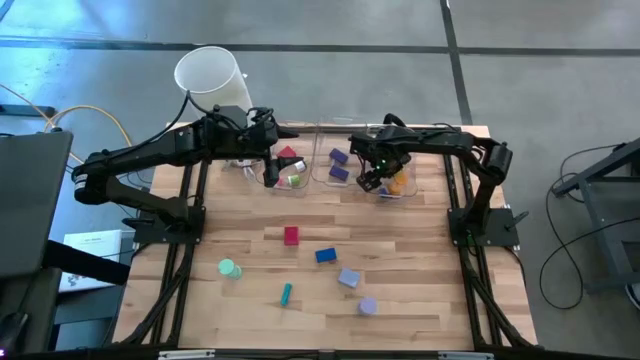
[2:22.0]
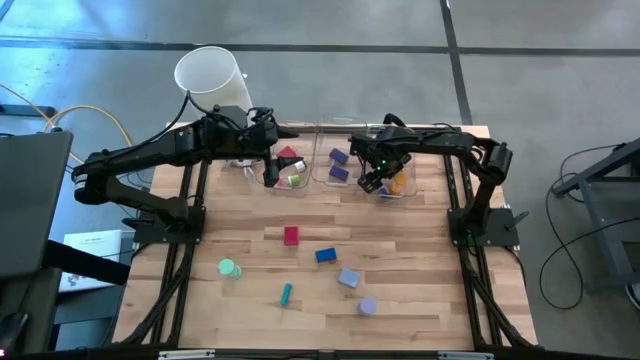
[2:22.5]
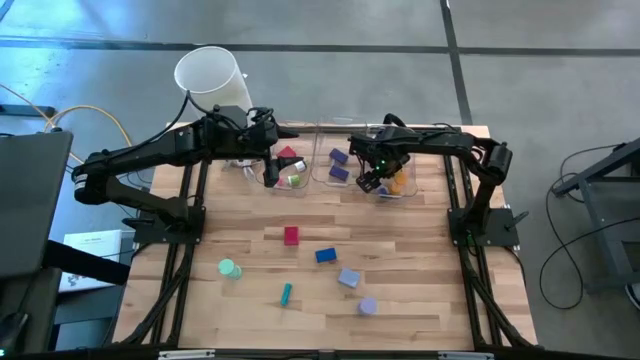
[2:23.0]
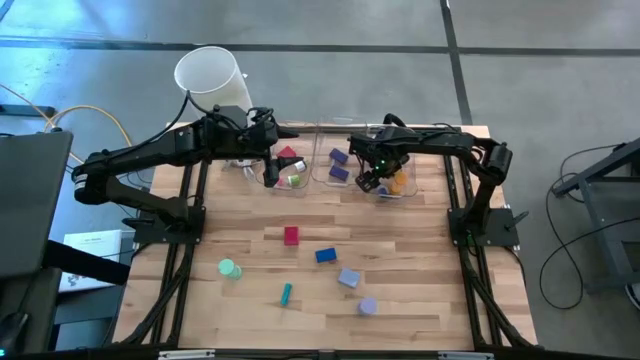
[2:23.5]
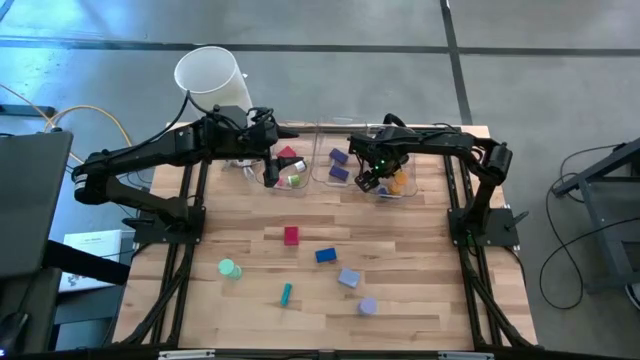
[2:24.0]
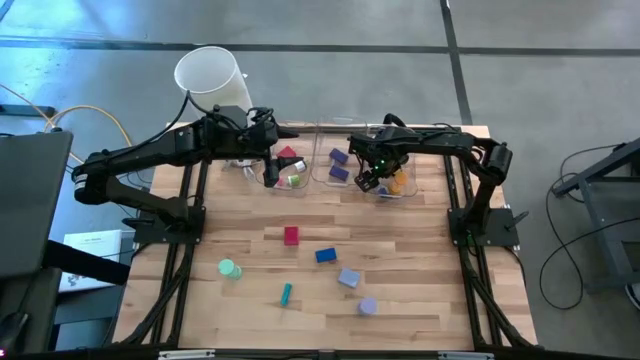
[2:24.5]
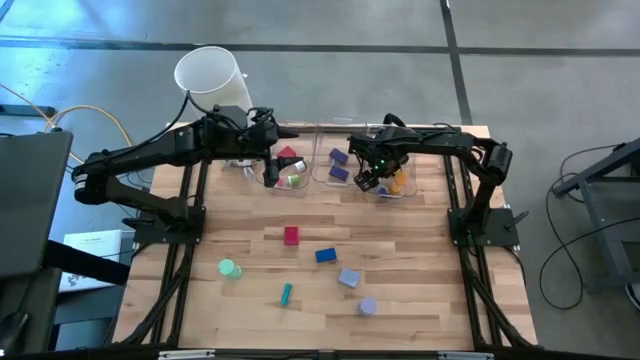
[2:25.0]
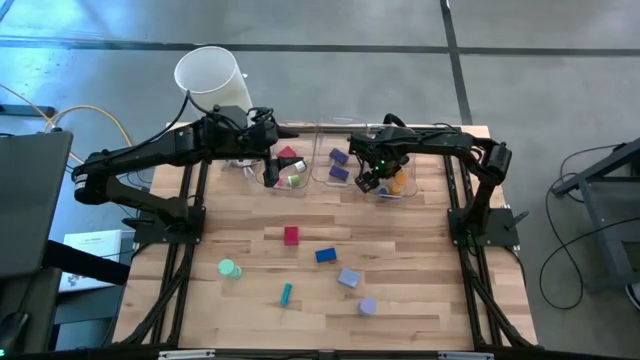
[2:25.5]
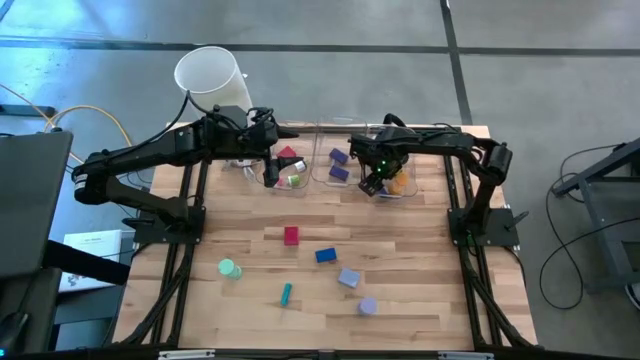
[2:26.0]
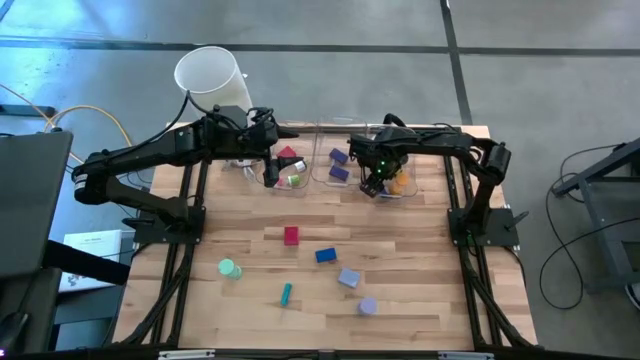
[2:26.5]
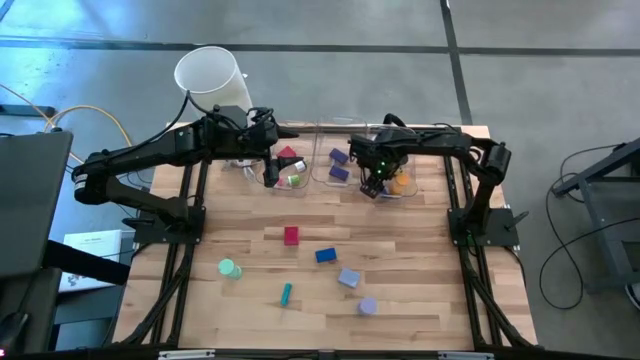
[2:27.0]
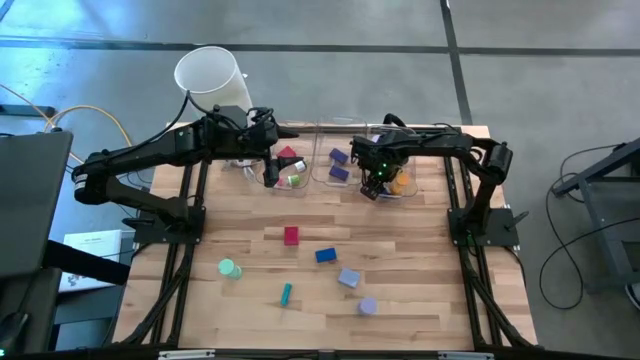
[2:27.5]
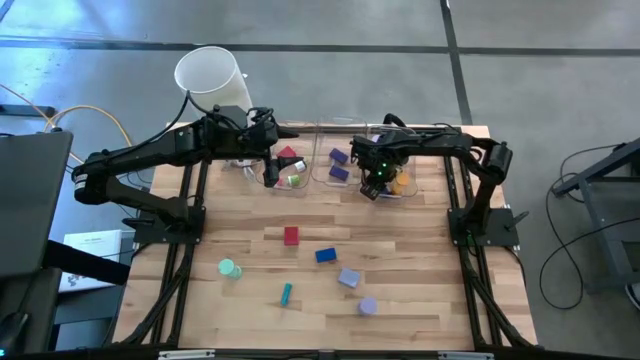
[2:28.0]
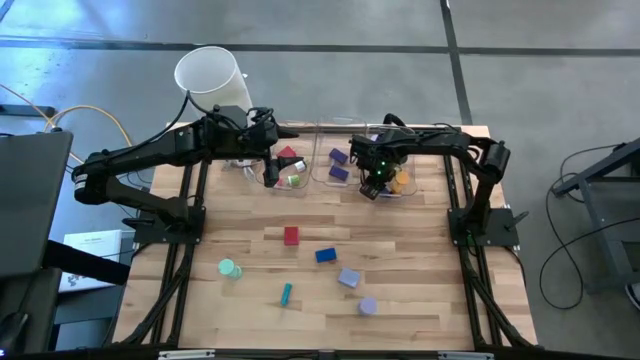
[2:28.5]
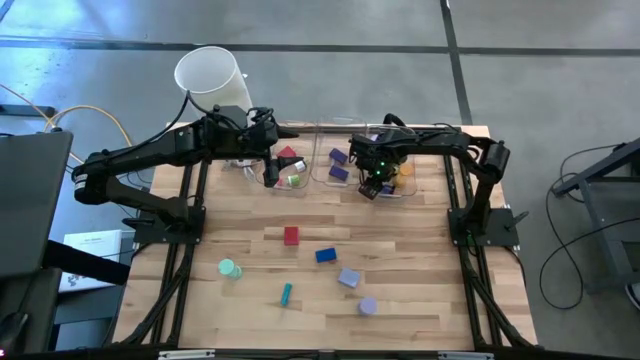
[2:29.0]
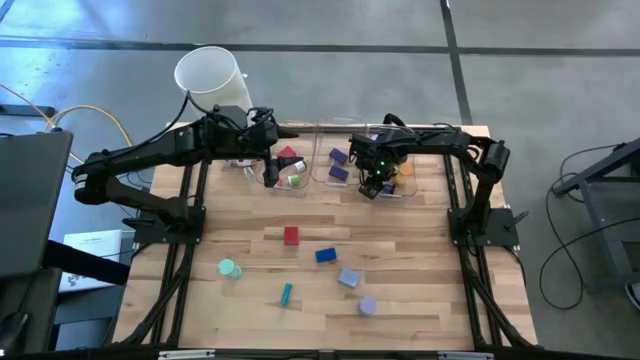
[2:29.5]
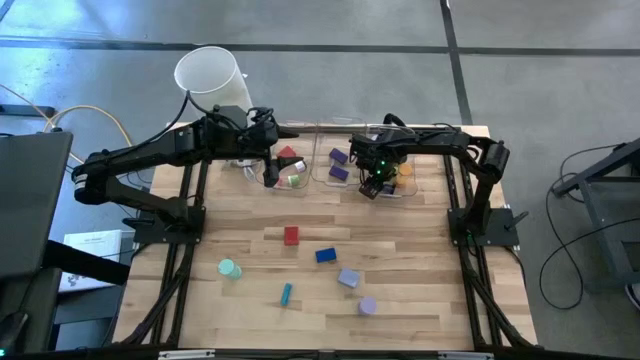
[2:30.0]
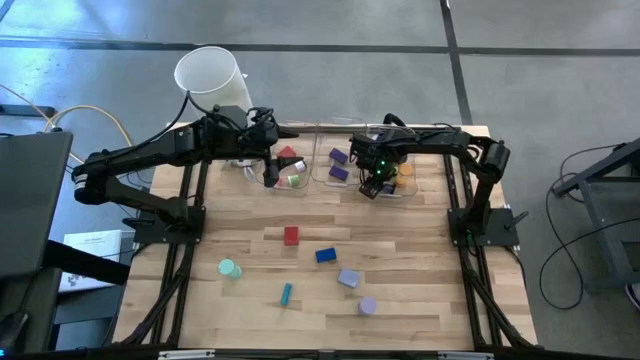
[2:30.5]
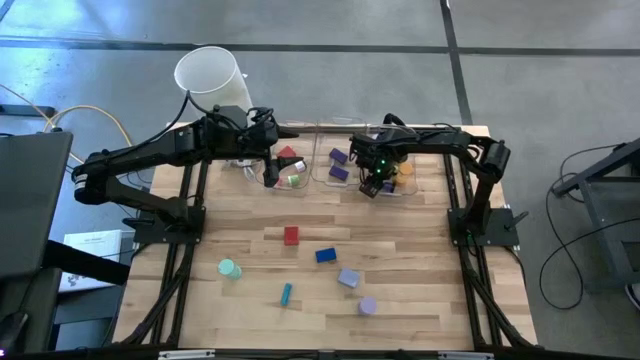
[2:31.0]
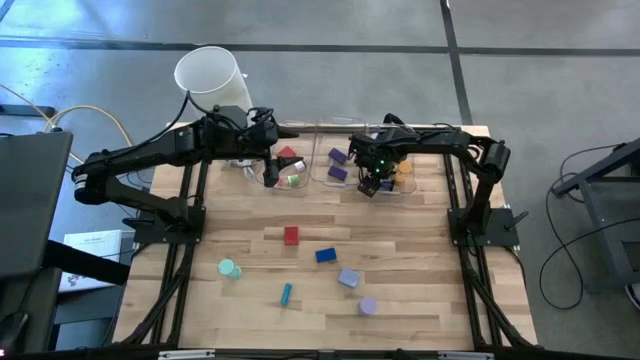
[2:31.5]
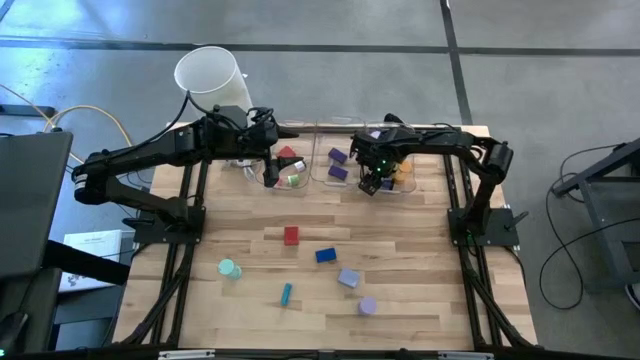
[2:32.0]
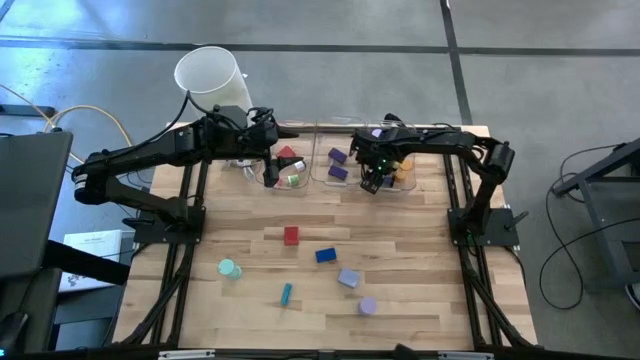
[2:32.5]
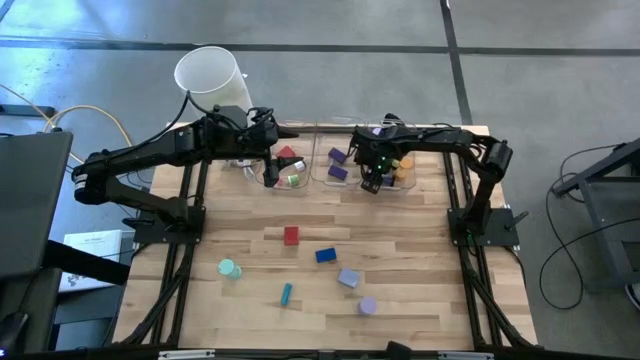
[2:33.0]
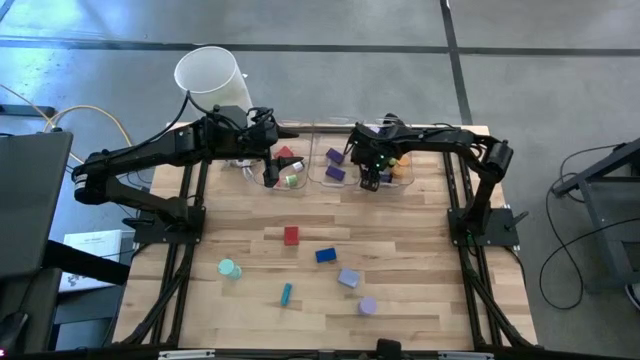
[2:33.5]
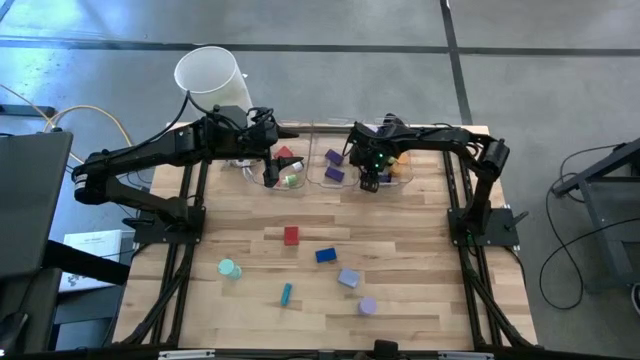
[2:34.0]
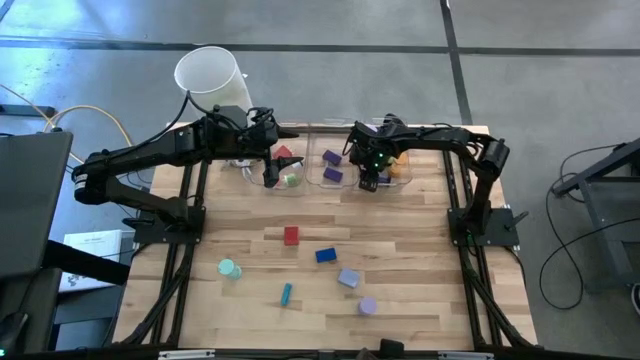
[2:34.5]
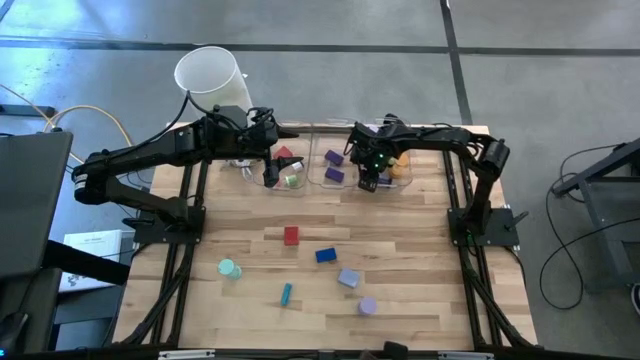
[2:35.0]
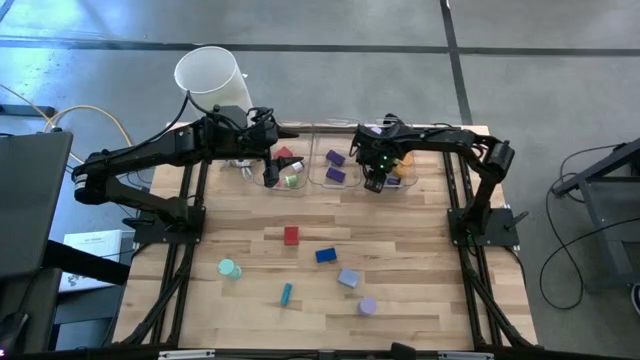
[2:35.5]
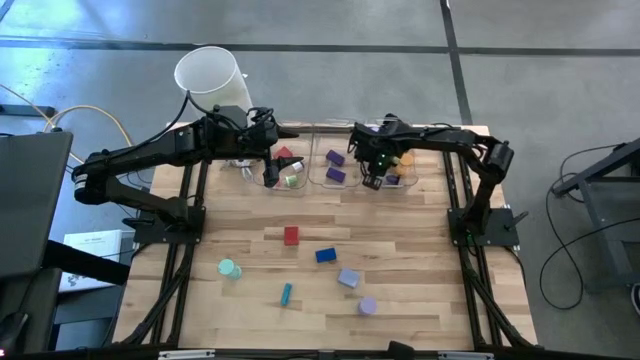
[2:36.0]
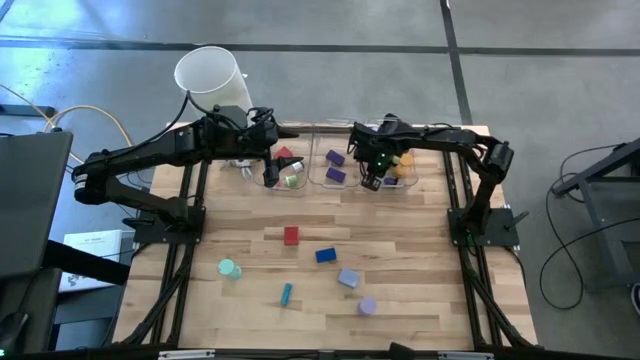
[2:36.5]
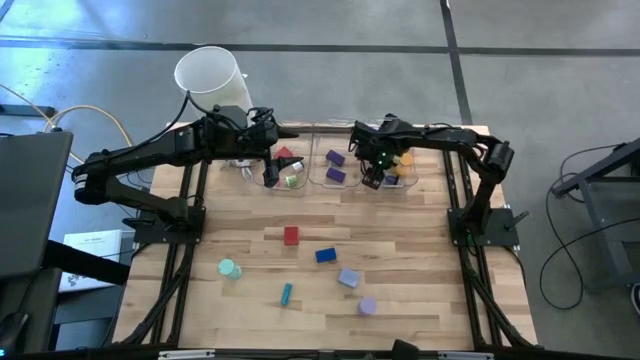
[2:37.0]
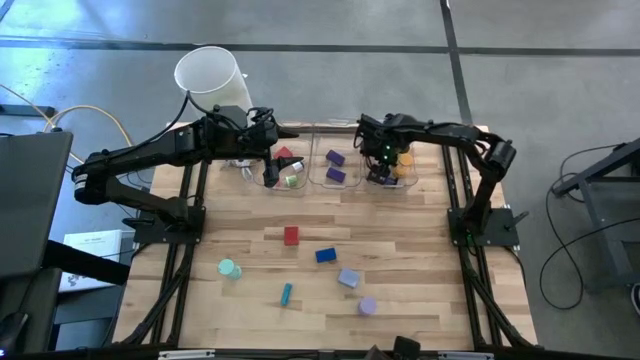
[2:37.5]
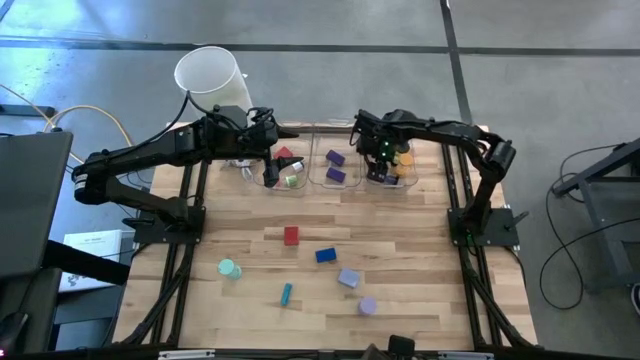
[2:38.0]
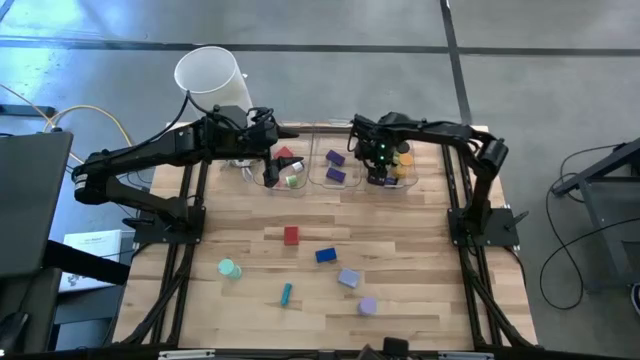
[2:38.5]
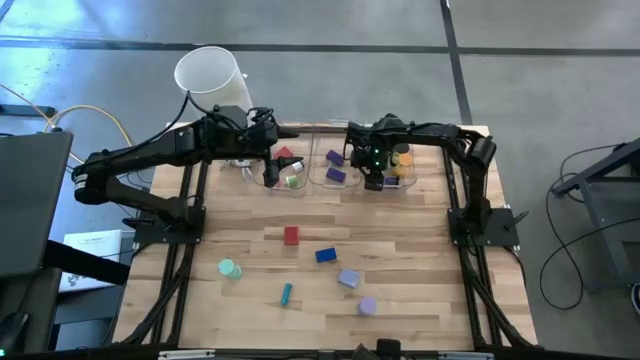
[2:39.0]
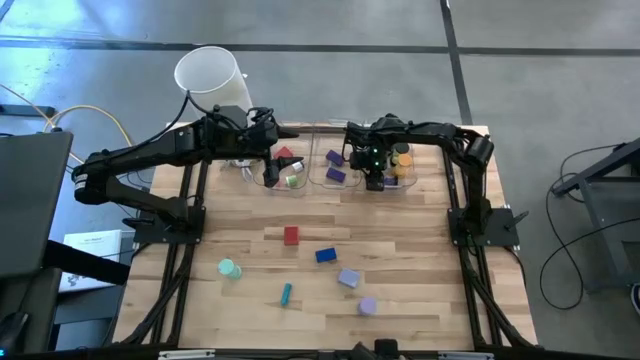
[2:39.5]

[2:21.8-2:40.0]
Task: Pick & Place Office items
Put the blue hourglass into the right transparent bin

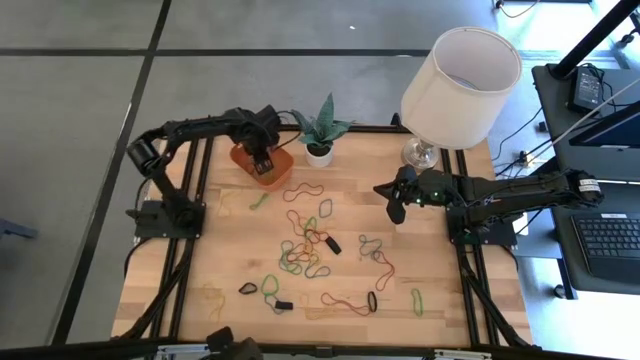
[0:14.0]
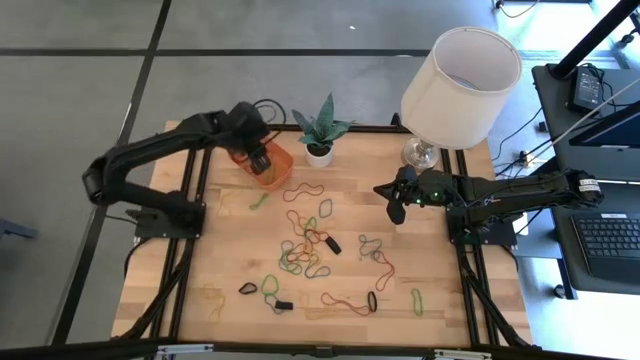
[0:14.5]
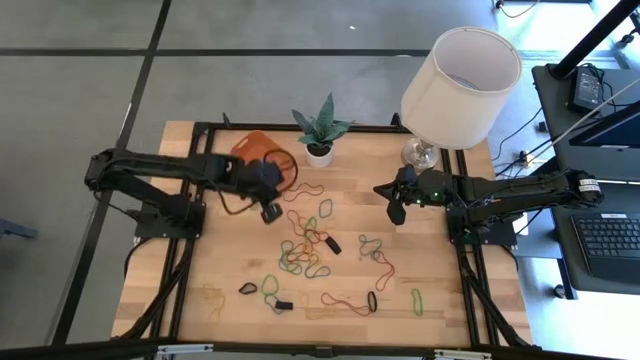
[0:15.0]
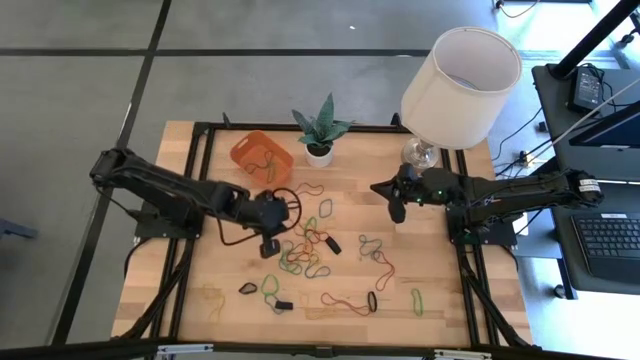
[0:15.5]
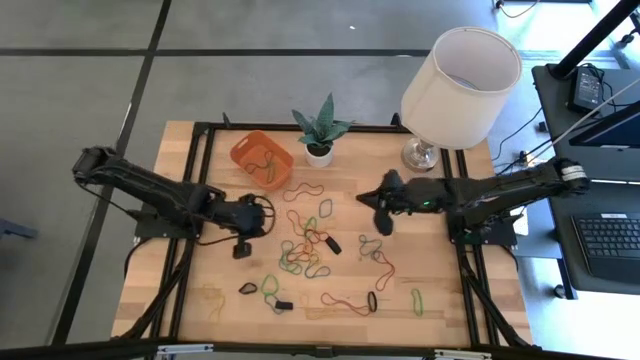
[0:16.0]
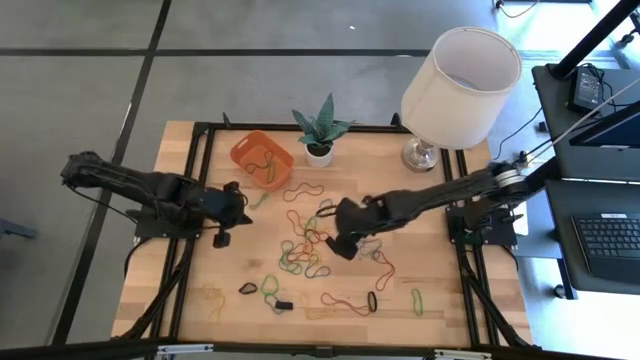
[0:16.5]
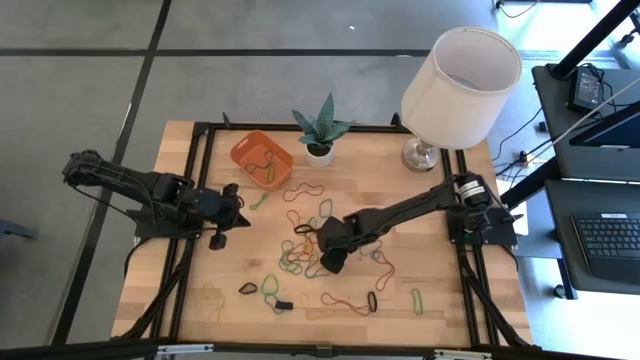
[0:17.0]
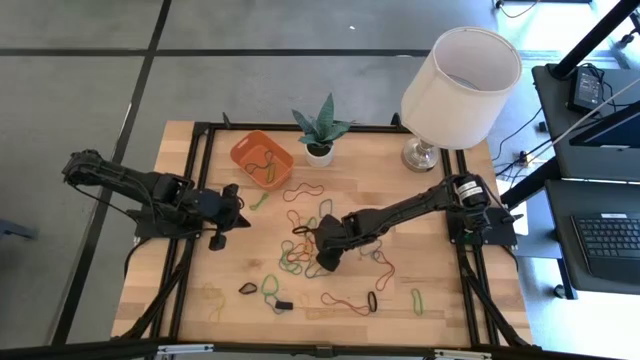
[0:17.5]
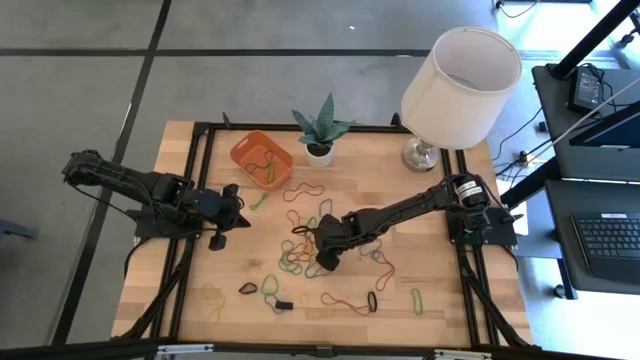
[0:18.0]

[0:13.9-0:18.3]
Task: Pick and place rubber bands into bin
Put the black rubber band into the orange bin
